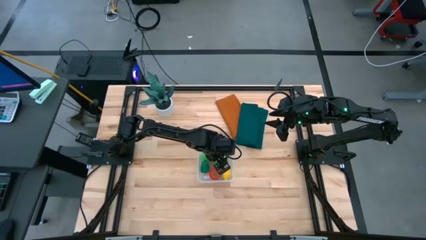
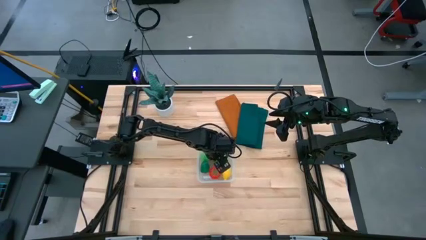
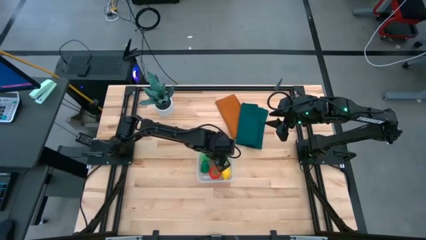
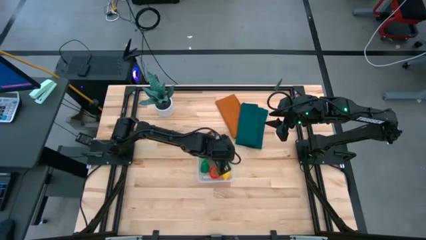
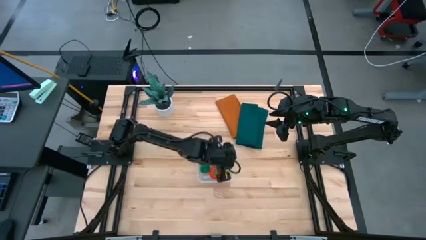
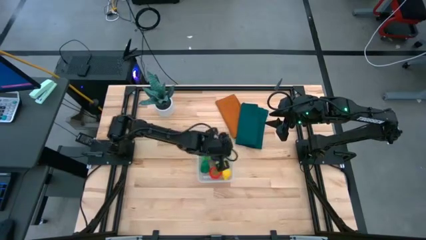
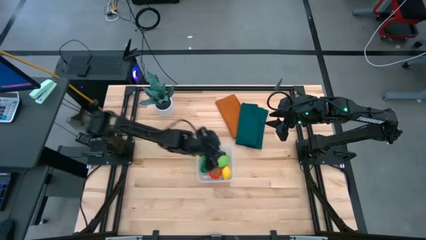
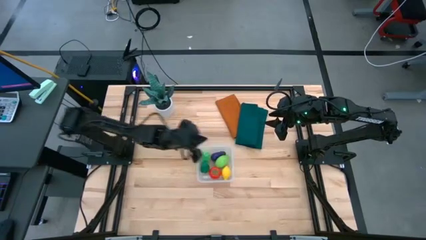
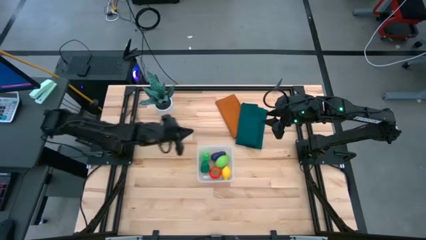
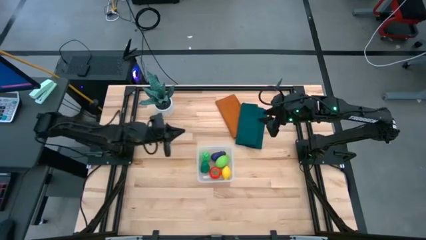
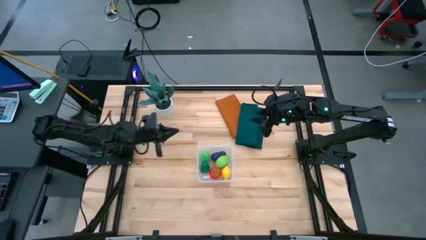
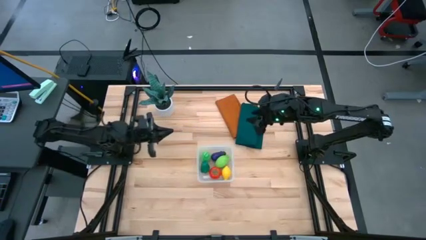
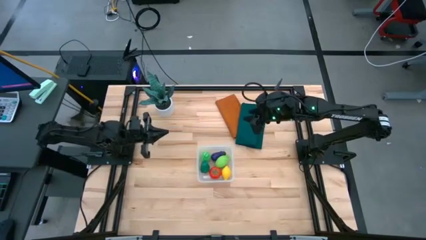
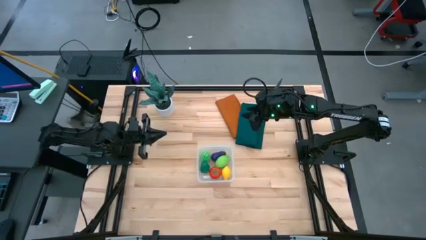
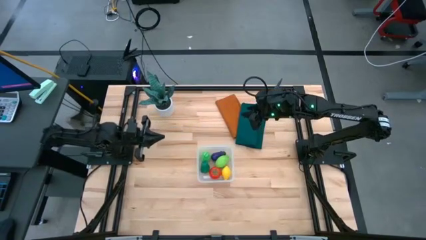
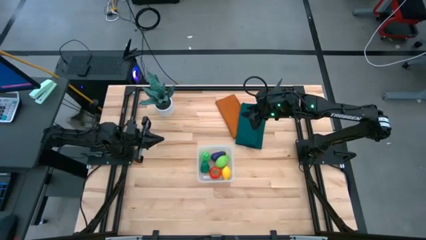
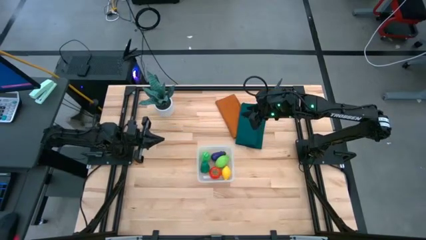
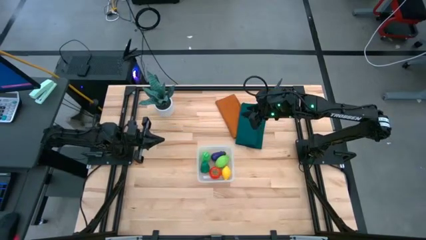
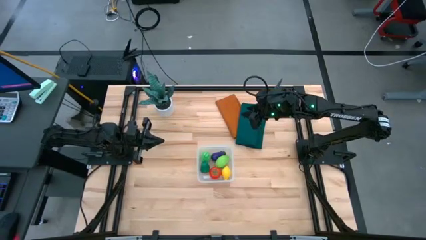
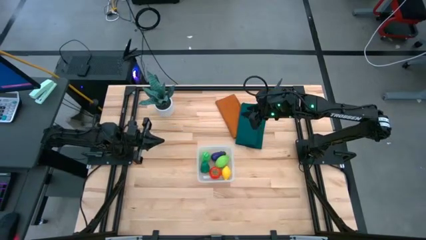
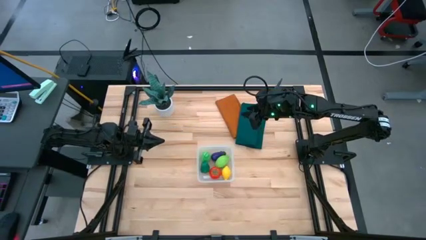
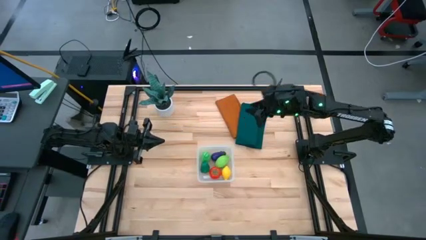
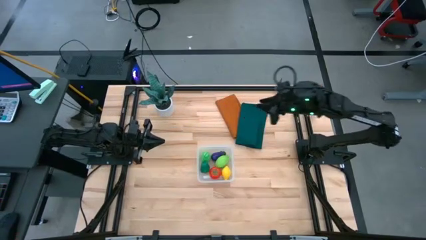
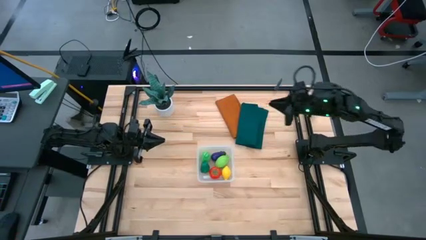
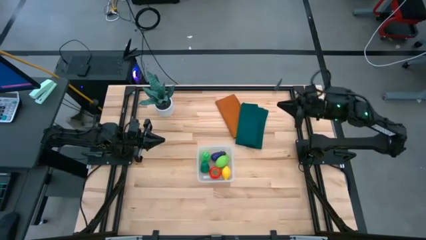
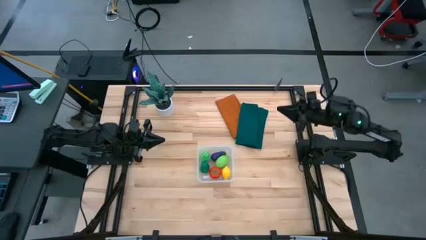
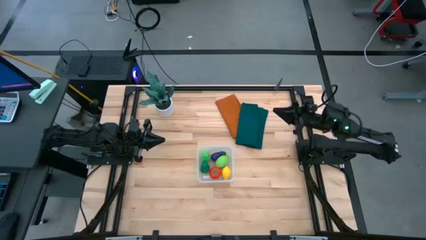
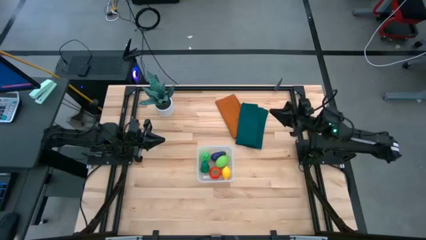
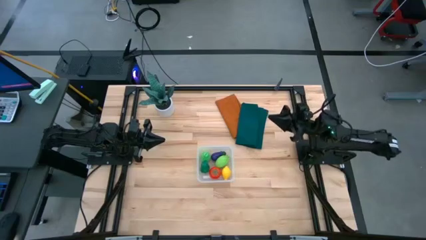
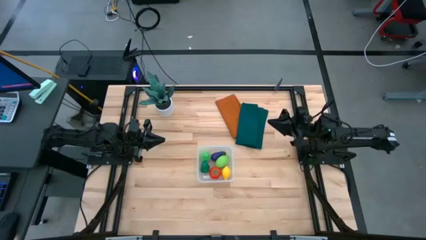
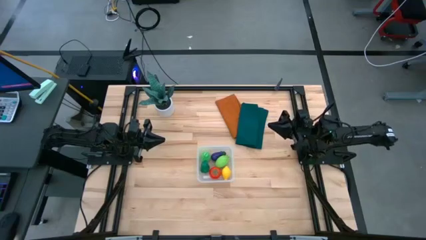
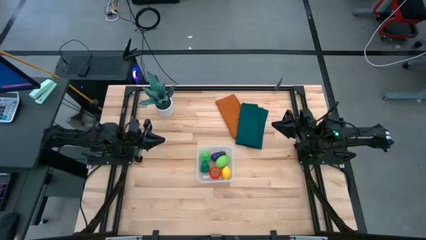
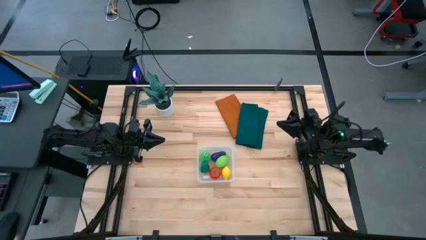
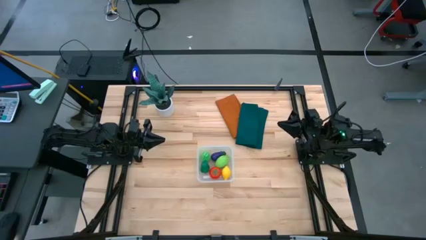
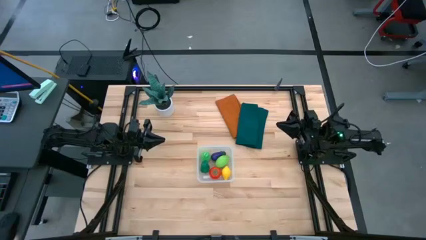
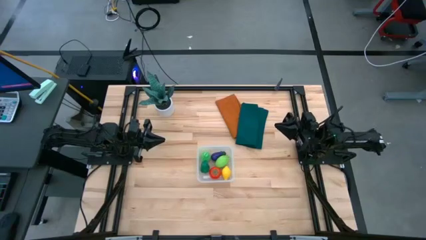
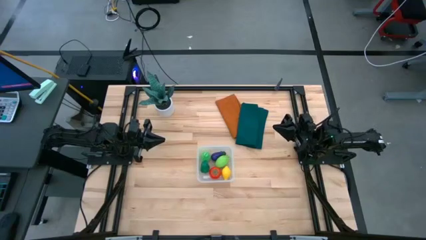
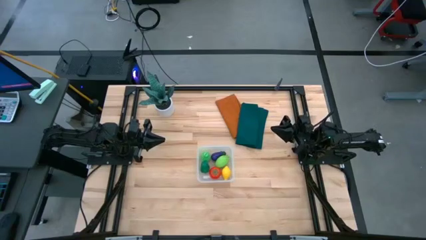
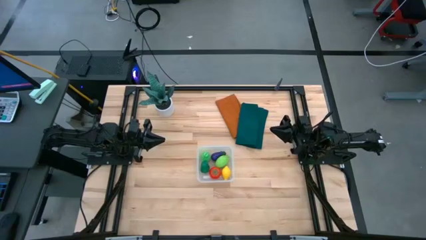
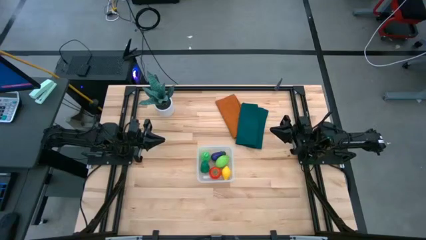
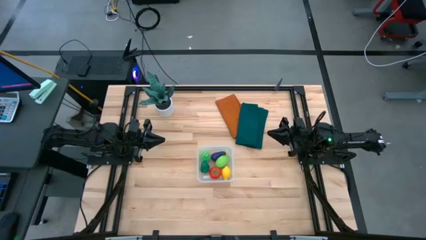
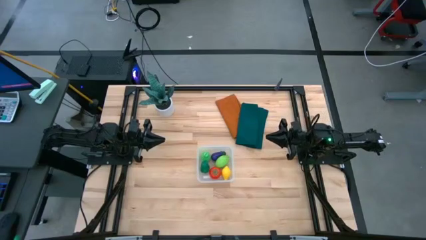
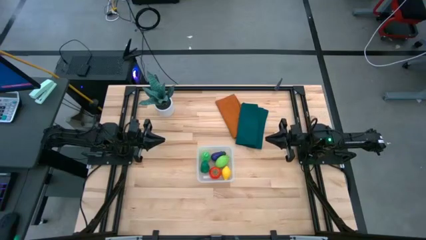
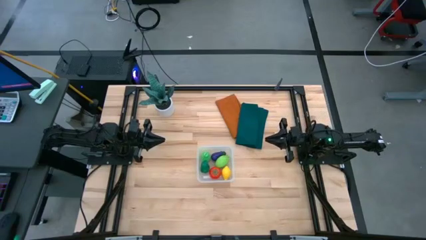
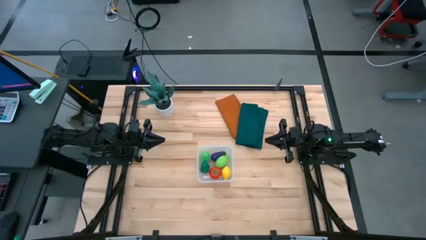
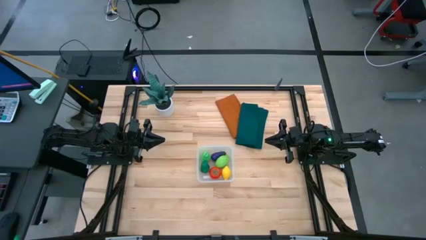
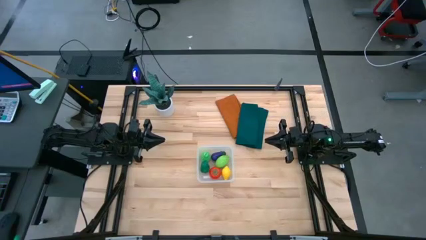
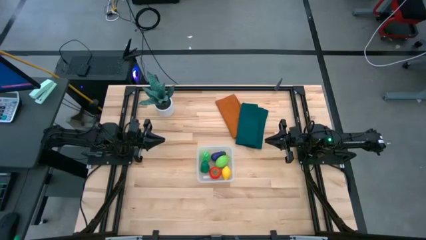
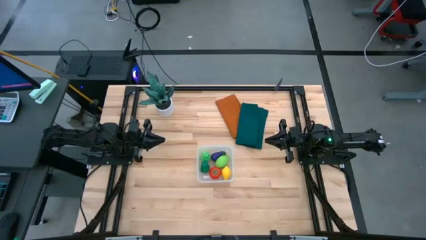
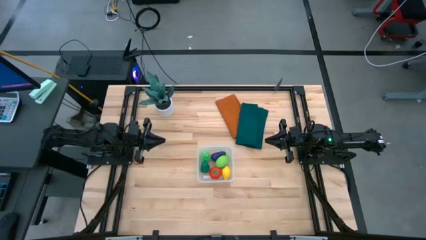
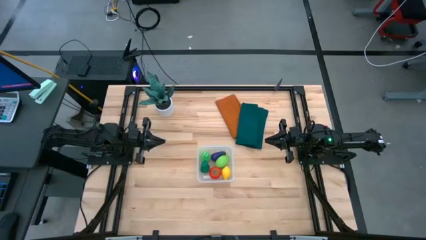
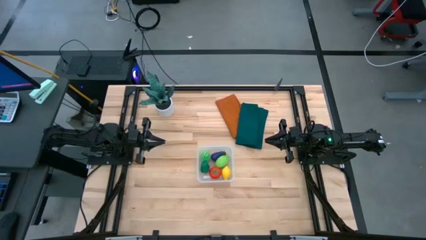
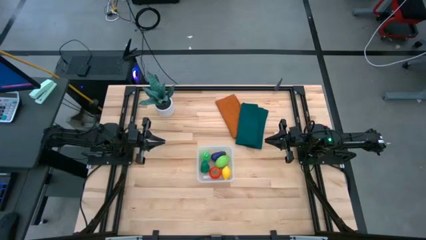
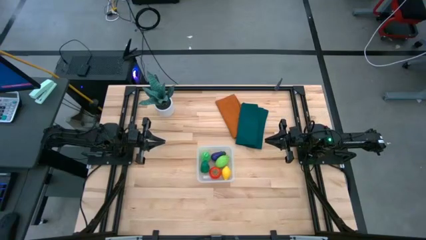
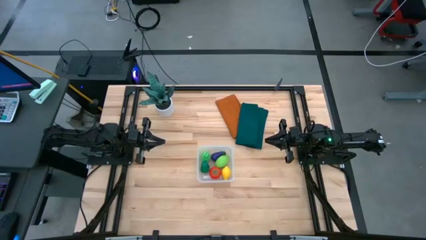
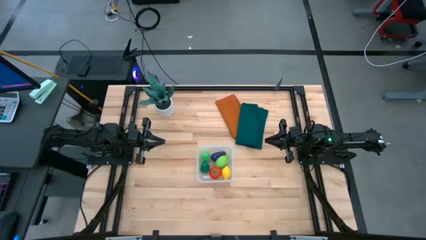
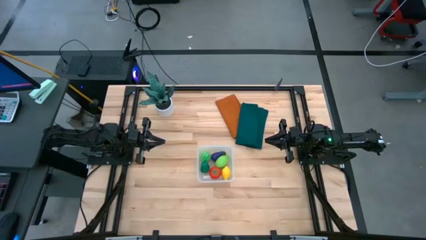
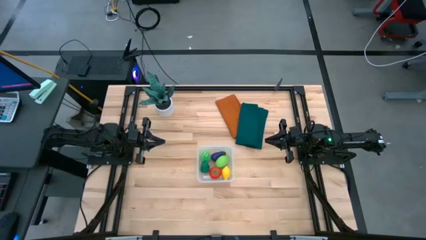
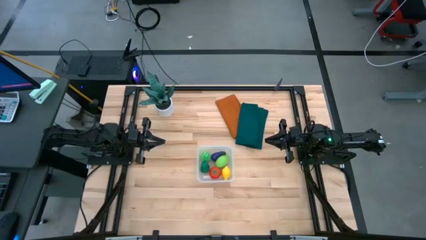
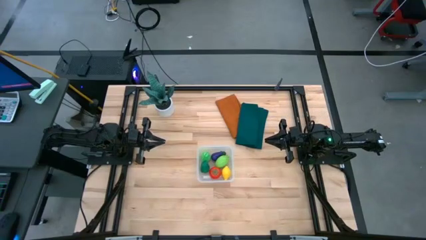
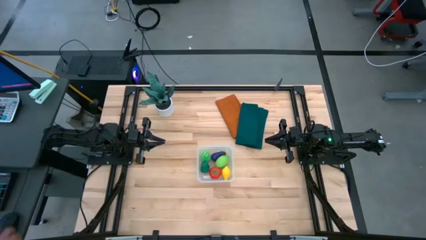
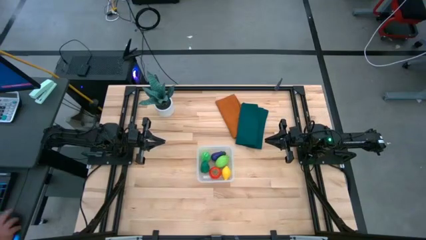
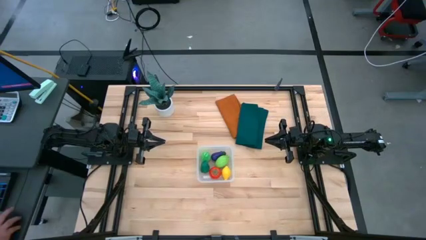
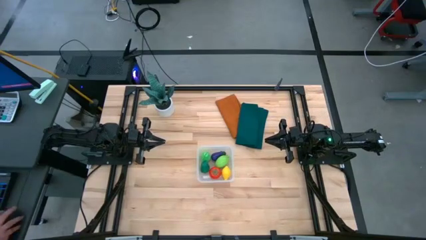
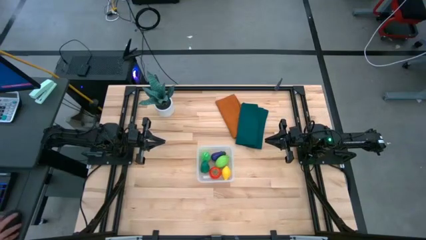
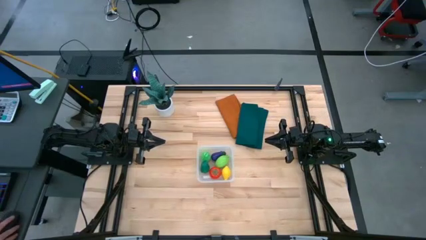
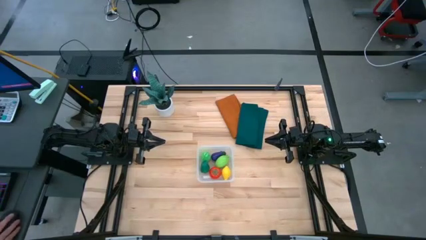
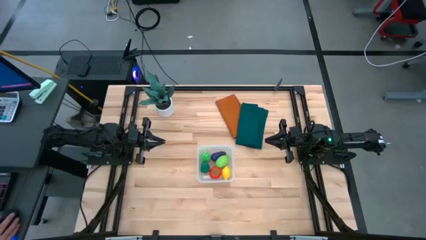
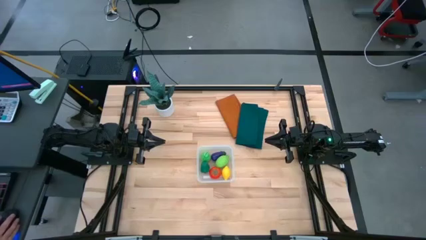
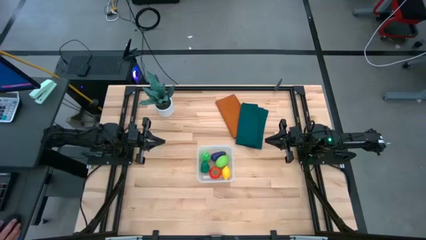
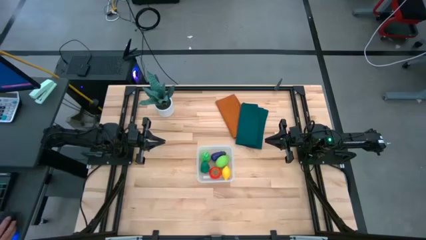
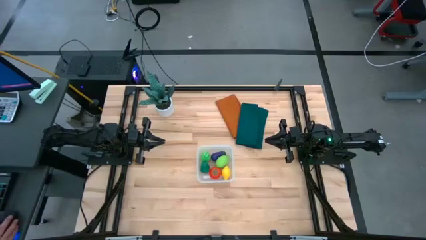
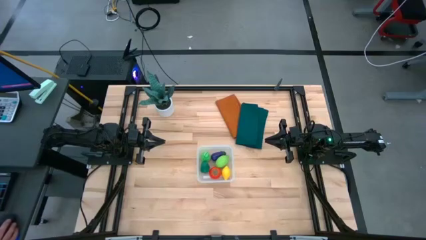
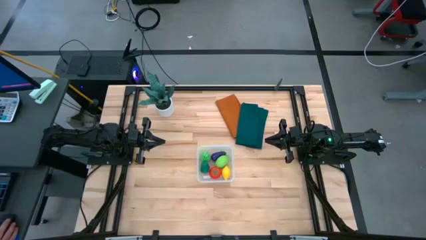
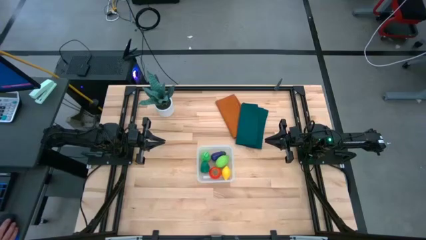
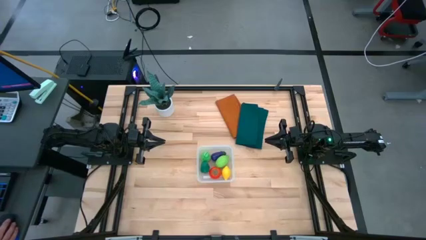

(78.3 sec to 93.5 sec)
Task: Pick and placing Produce into tupperware
Return to Home Position
